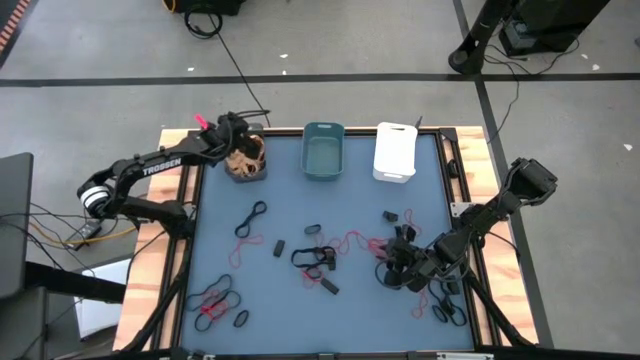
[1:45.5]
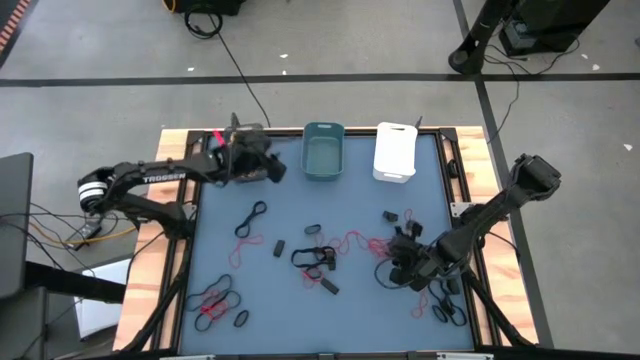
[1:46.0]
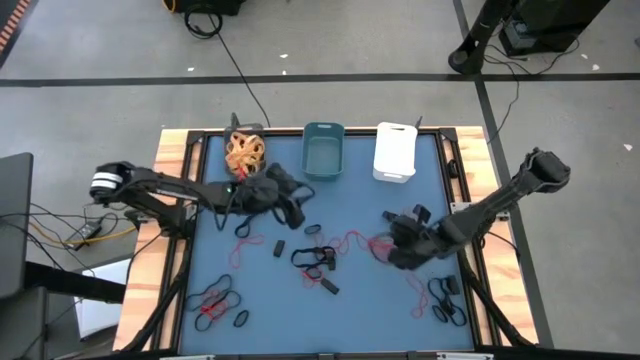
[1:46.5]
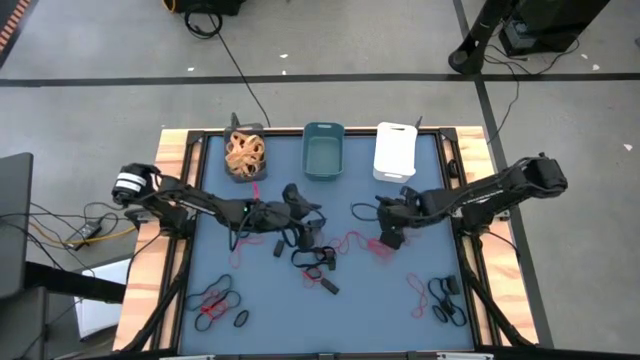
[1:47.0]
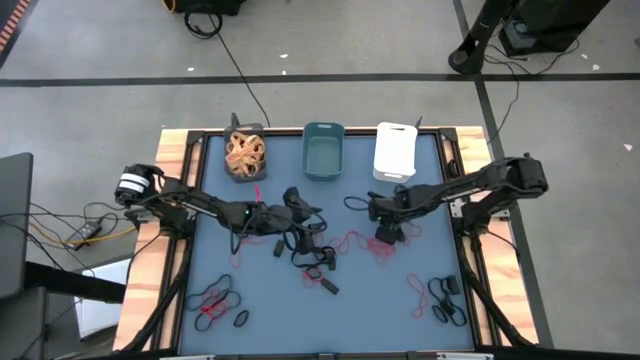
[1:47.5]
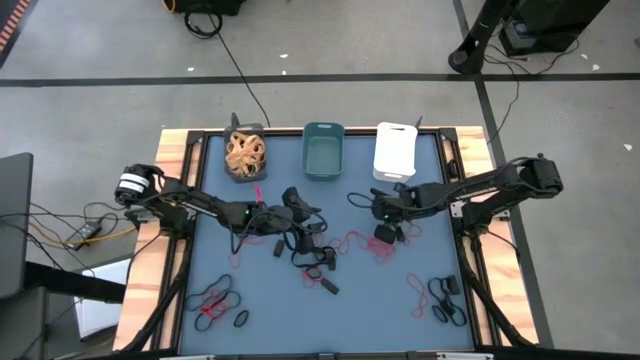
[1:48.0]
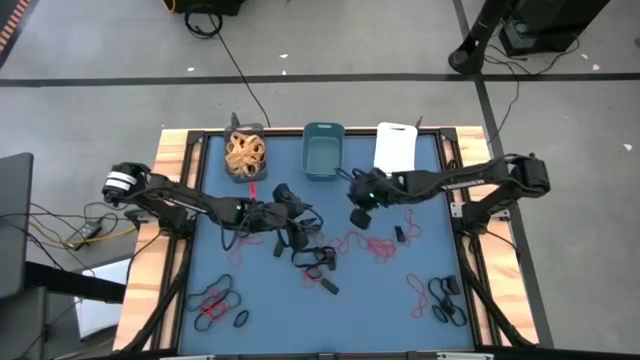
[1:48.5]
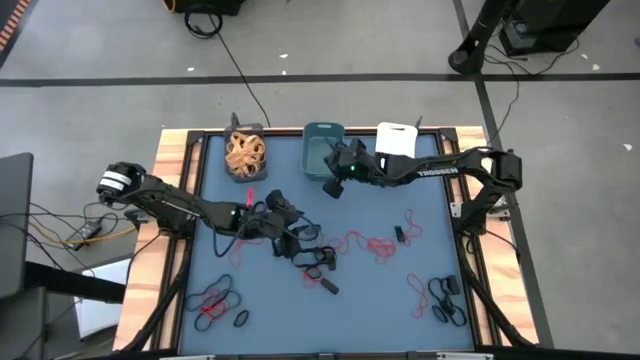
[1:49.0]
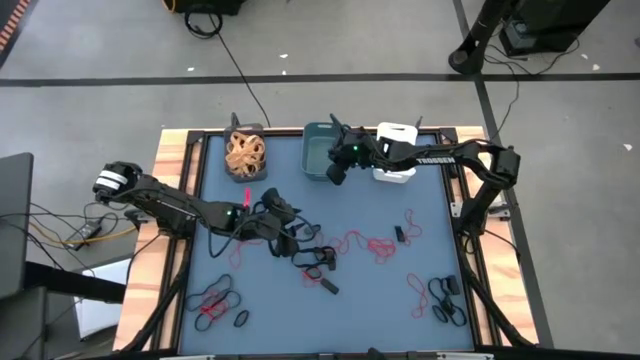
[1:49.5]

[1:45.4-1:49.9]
Task: Sort rubber bands into baskets
Put the black rubber band into the blue bin

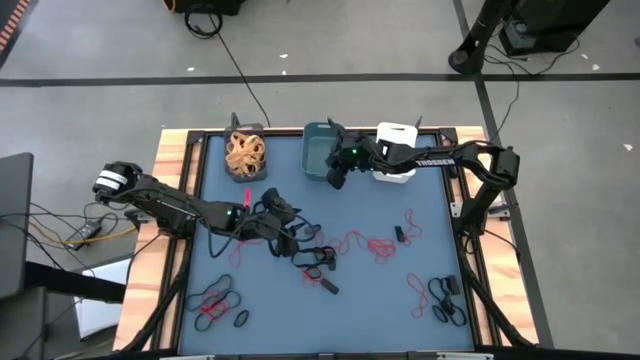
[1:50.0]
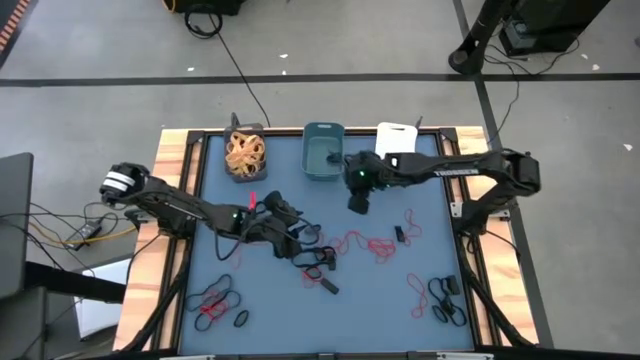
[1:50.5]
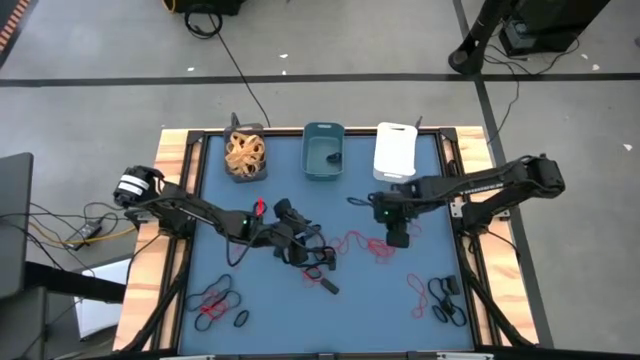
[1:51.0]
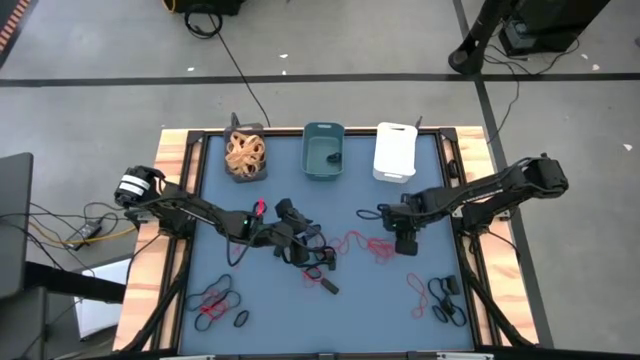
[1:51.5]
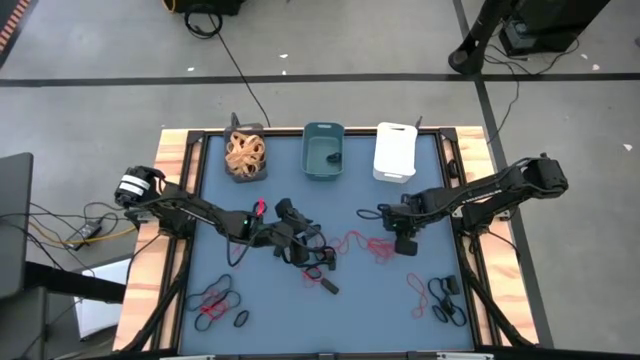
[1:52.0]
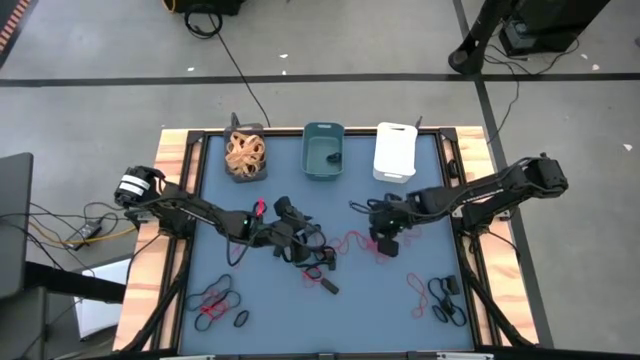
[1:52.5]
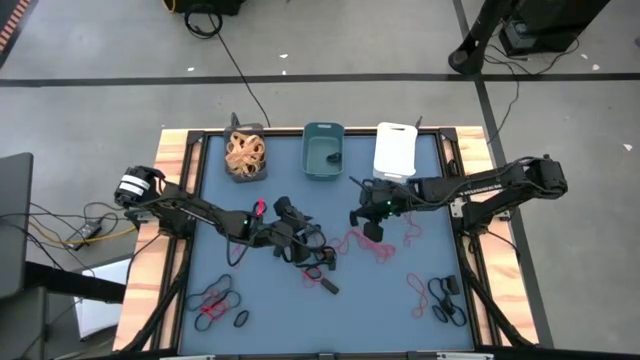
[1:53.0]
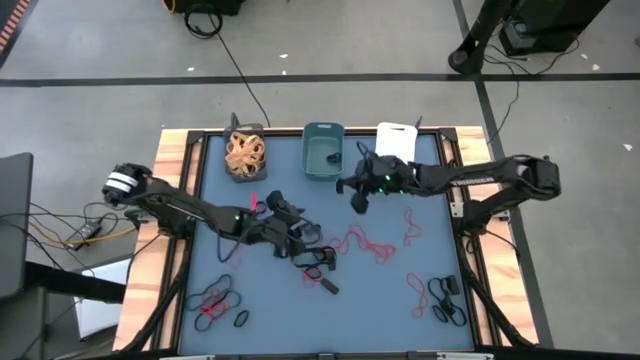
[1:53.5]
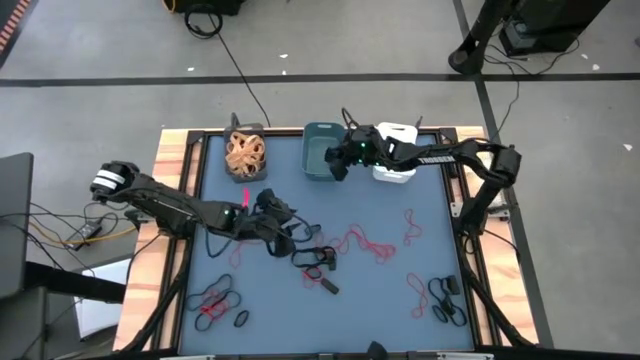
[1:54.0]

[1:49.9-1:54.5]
Put the black rubber band into the blue bin

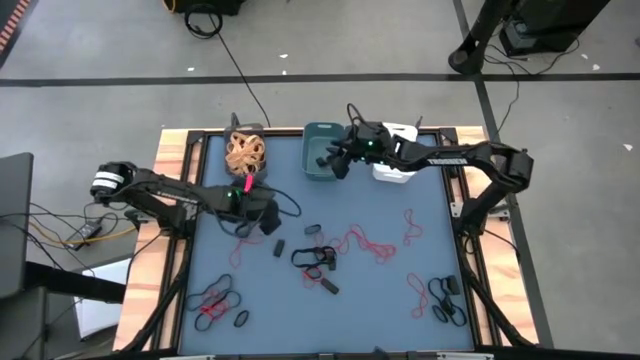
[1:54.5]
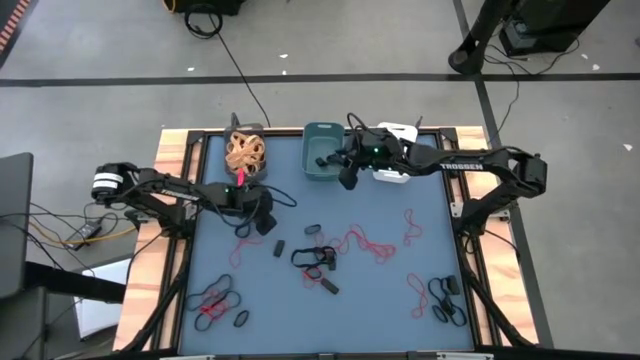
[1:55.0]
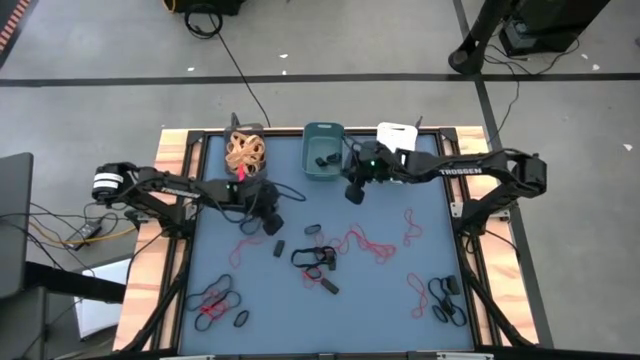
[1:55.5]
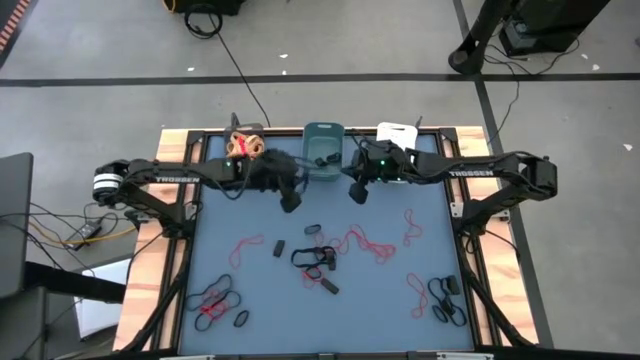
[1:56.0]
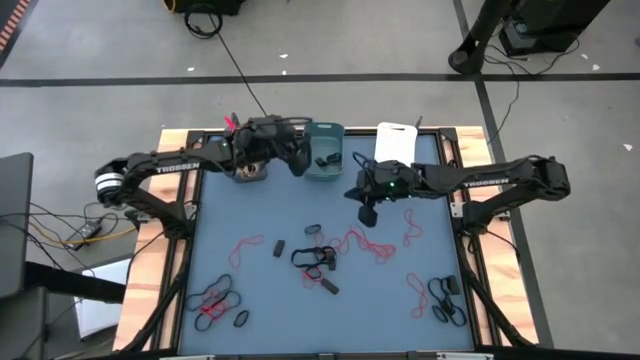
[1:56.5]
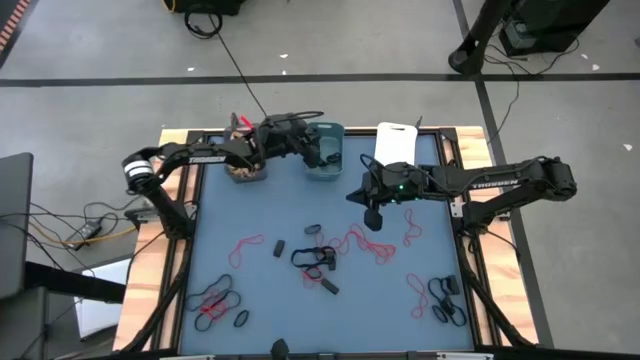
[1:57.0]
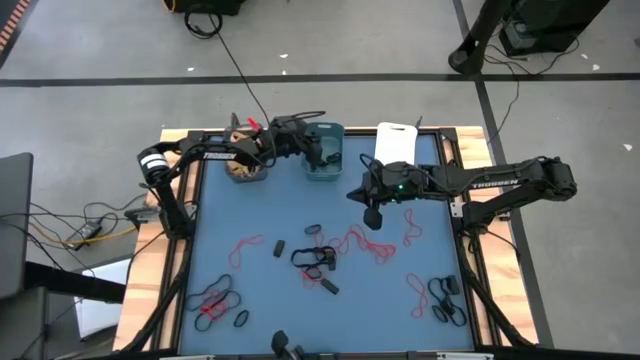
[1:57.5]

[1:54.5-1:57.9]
Put the black rubber band into the blue bin

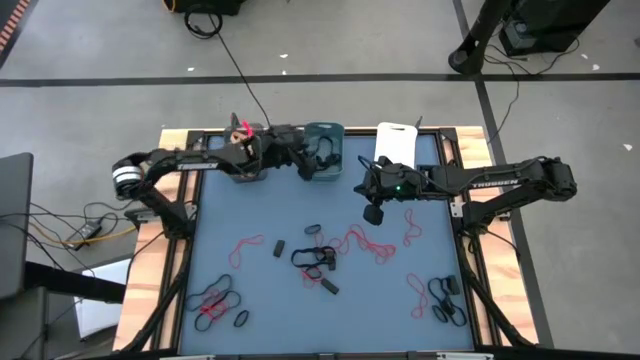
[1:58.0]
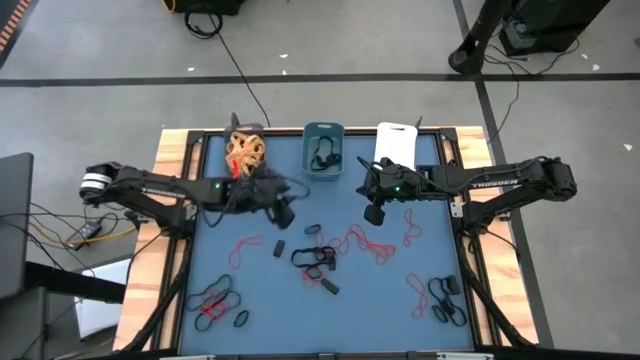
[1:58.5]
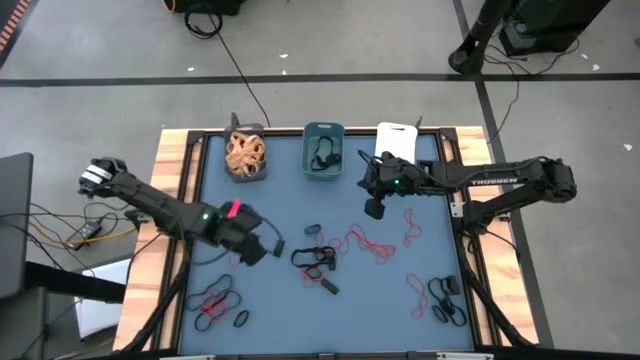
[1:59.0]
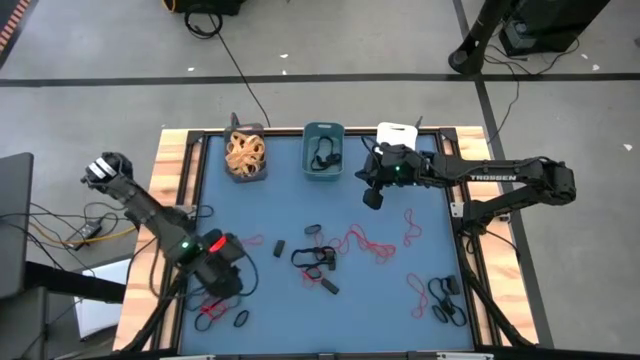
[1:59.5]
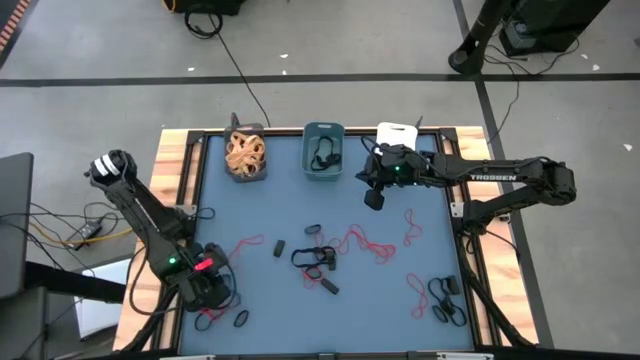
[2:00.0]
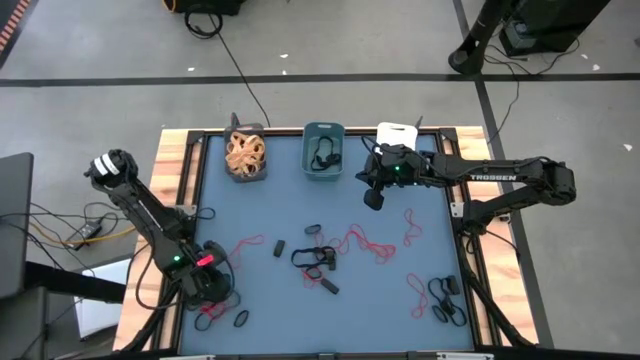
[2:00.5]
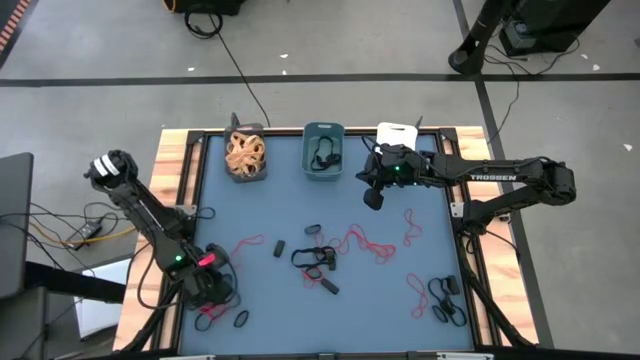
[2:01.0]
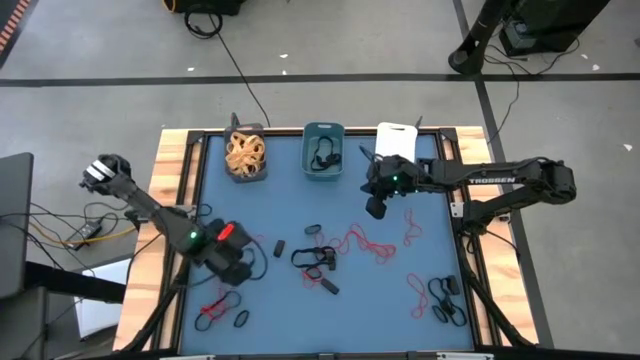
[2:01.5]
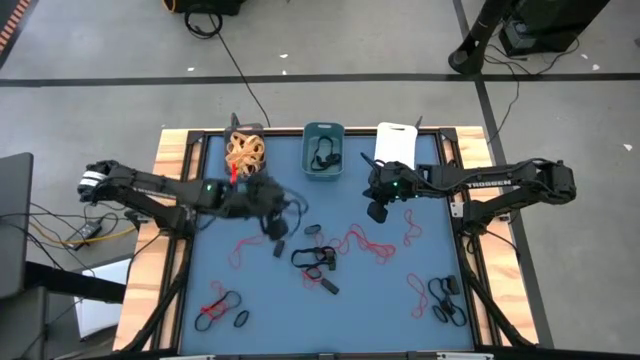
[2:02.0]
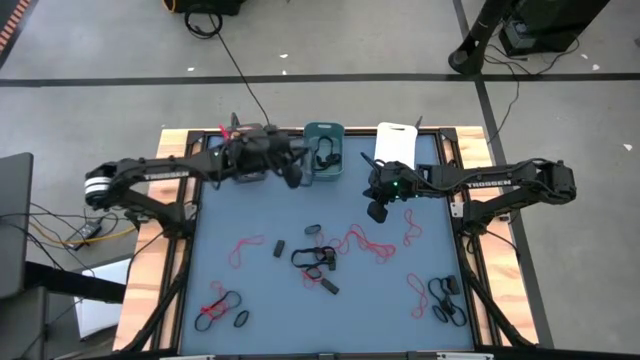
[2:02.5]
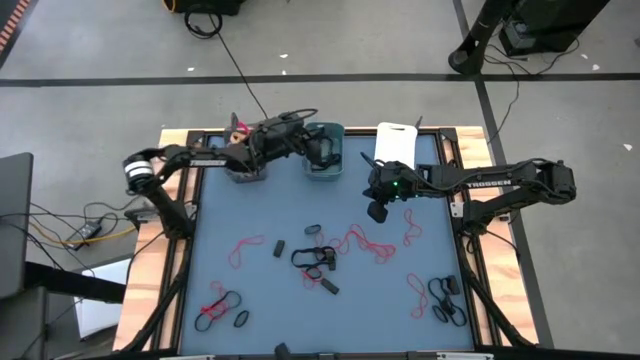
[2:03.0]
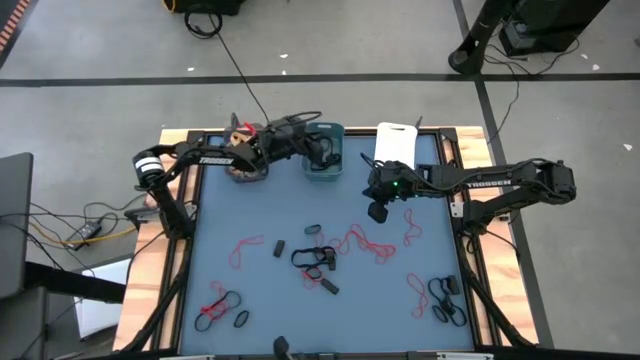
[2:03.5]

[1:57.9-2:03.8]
Put the black rubber band into the blue bin

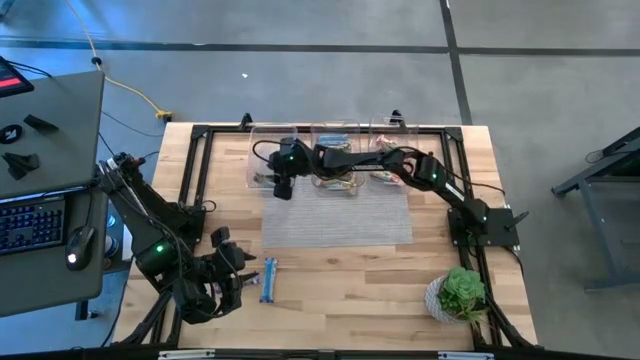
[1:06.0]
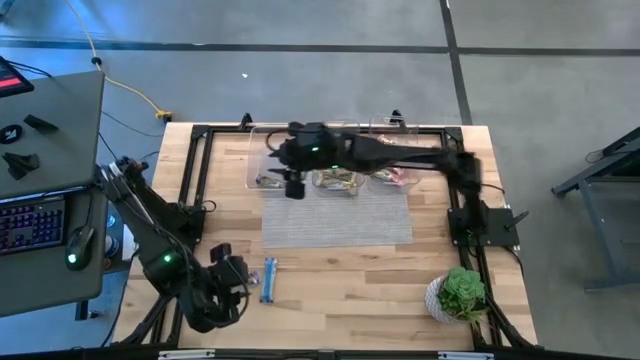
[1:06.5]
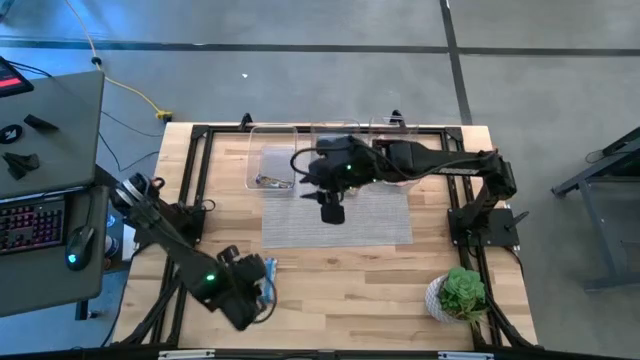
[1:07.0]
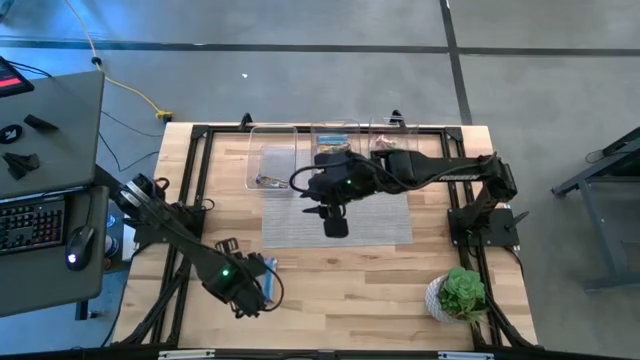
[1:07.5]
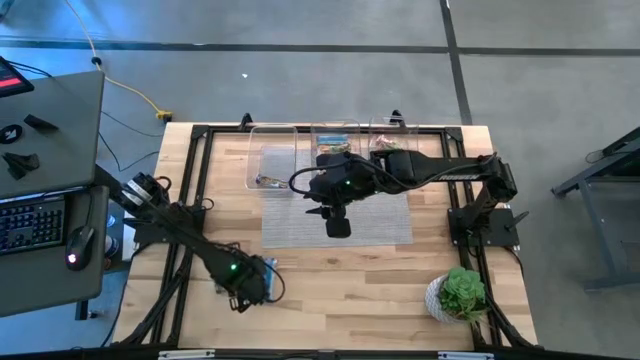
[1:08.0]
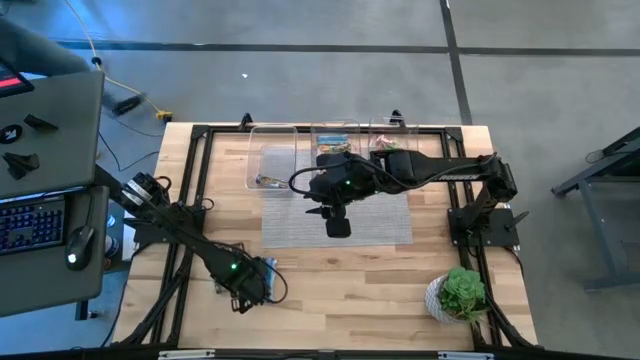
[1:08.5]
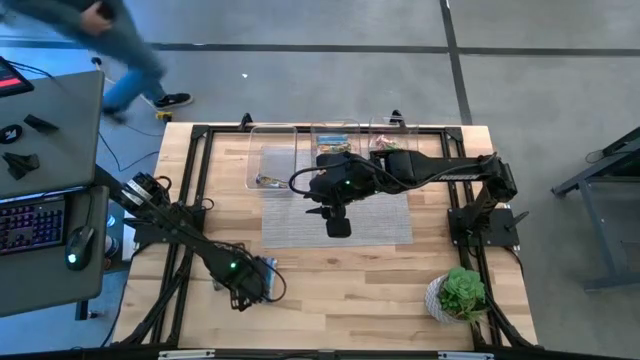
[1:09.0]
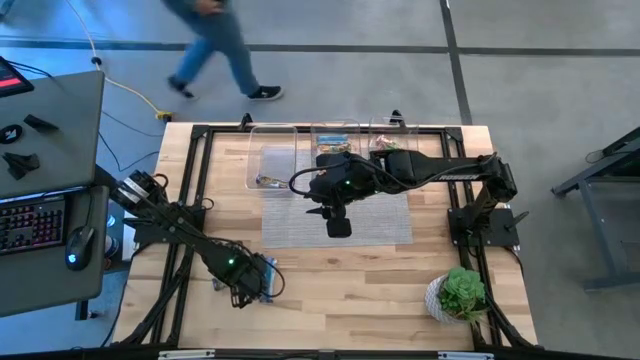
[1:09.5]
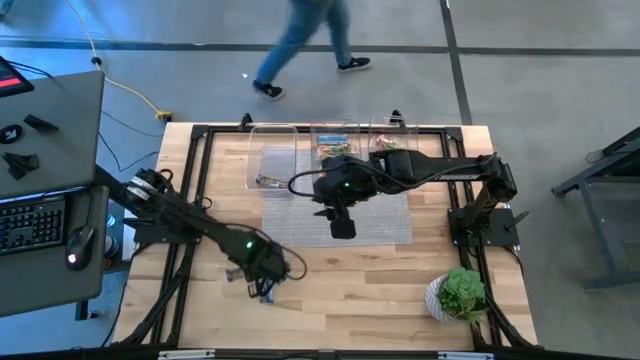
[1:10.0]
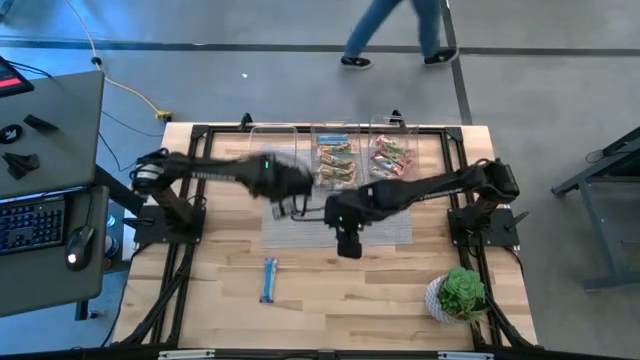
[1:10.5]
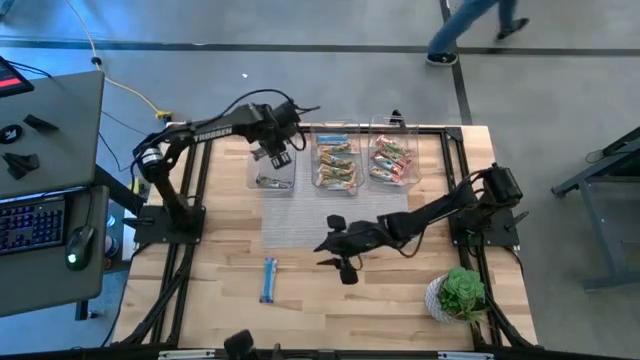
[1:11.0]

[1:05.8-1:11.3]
Task: Pick and place Granola Bars by type
Put the blue granola bar into the left transparent bin
